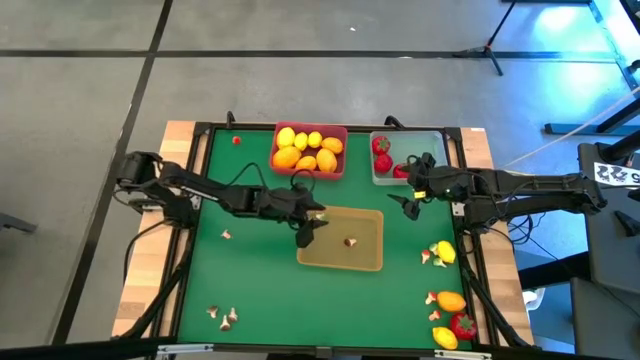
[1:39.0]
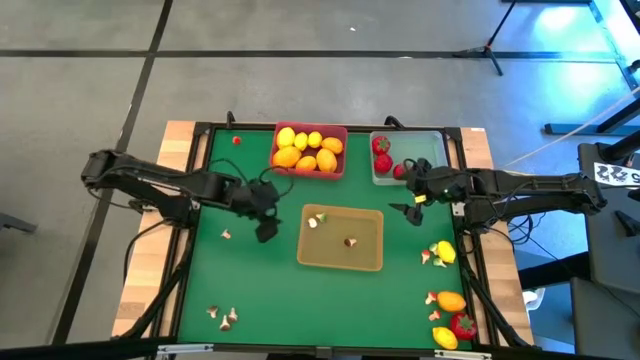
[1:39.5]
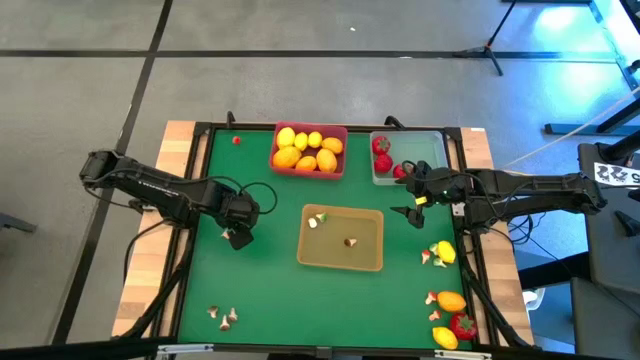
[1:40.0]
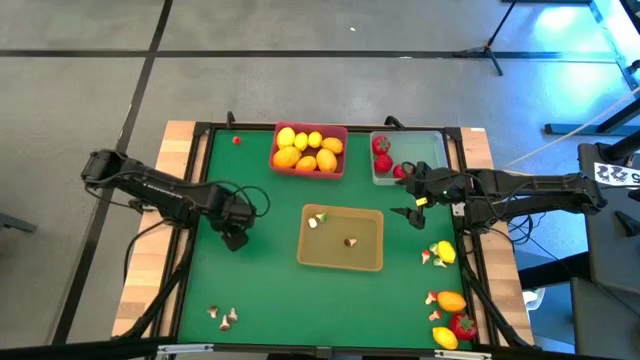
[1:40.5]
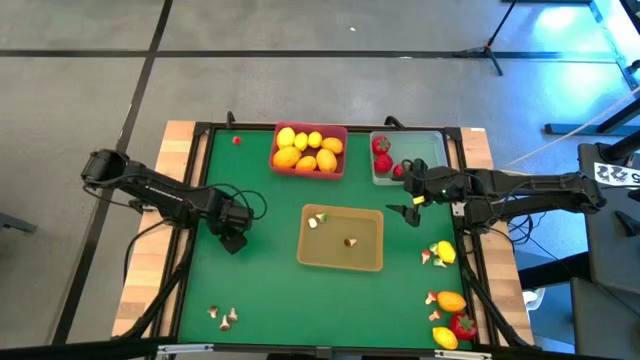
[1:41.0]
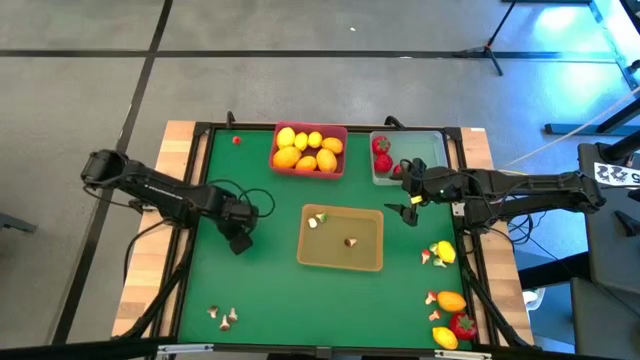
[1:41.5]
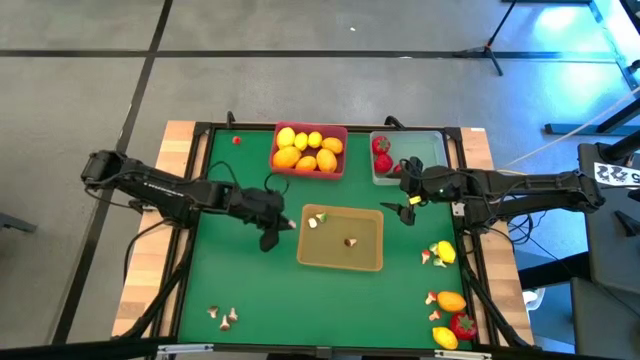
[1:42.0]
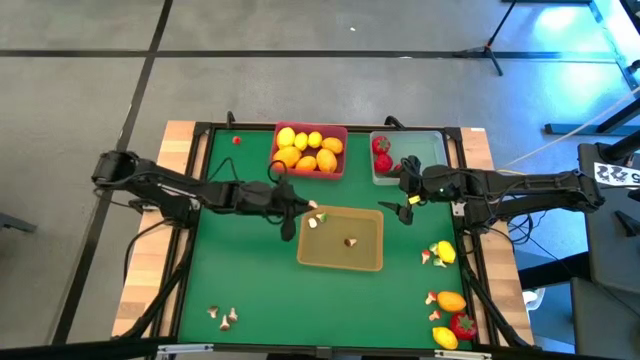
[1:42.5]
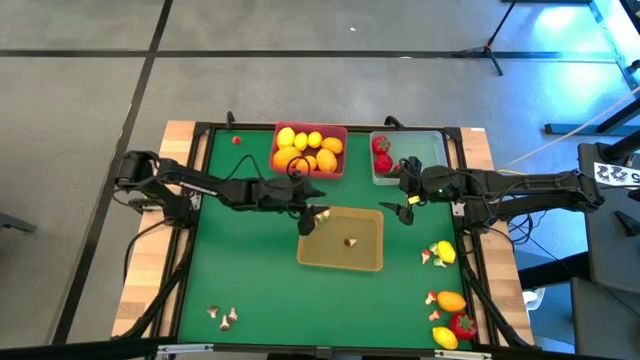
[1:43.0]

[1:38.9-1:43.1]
Task: Sort produce into baskets
Put the light brown mushroom into the orange bin

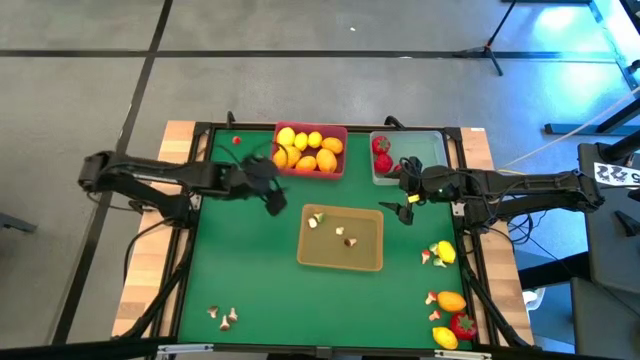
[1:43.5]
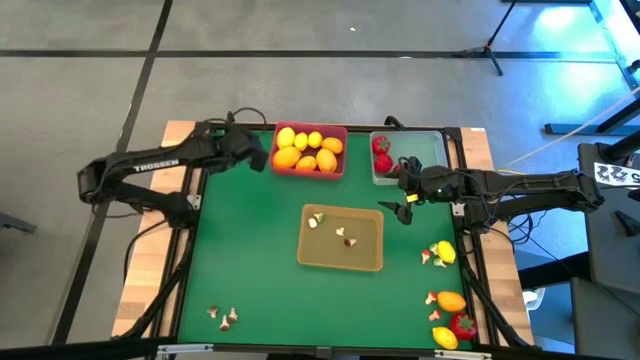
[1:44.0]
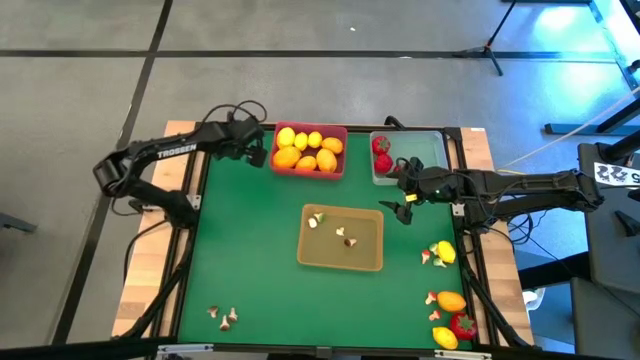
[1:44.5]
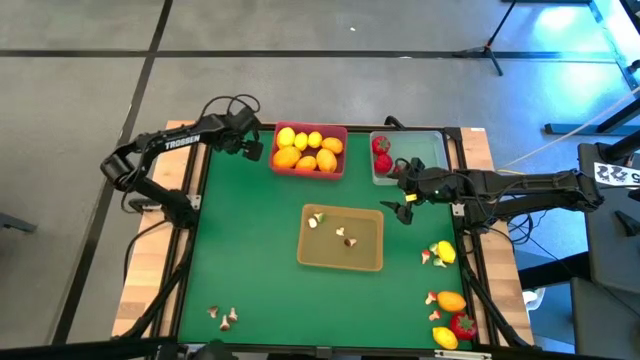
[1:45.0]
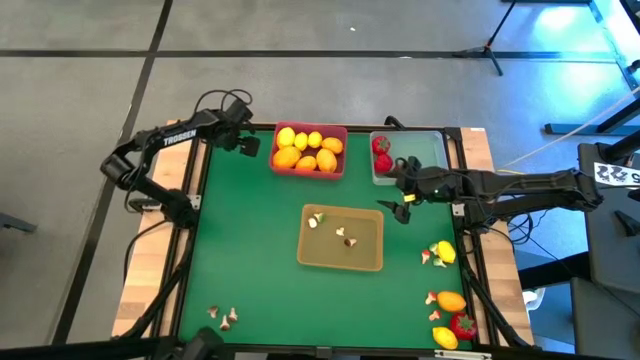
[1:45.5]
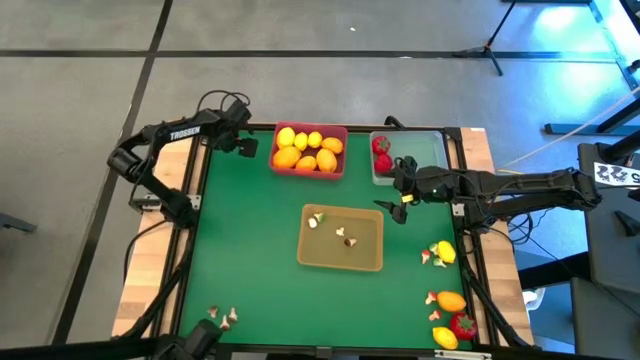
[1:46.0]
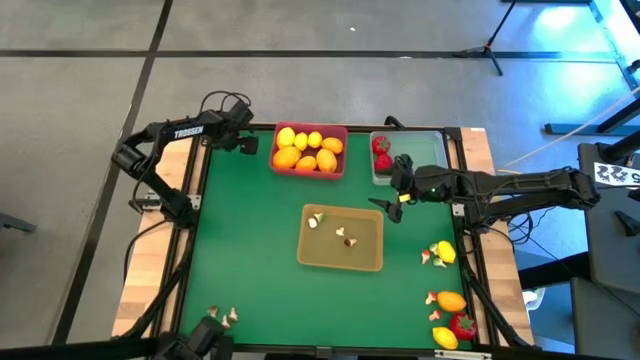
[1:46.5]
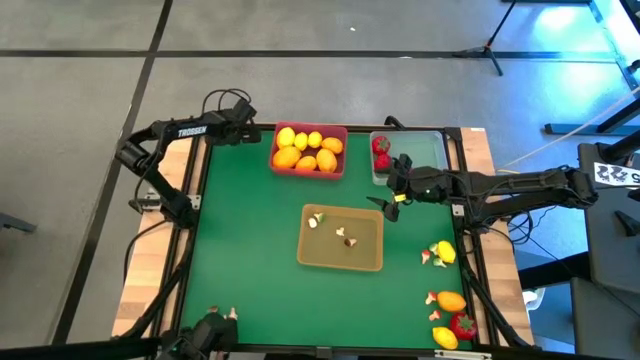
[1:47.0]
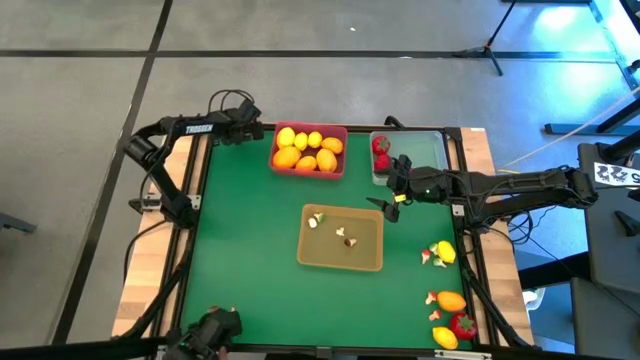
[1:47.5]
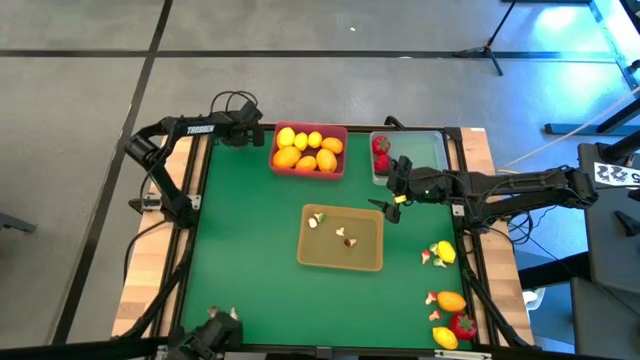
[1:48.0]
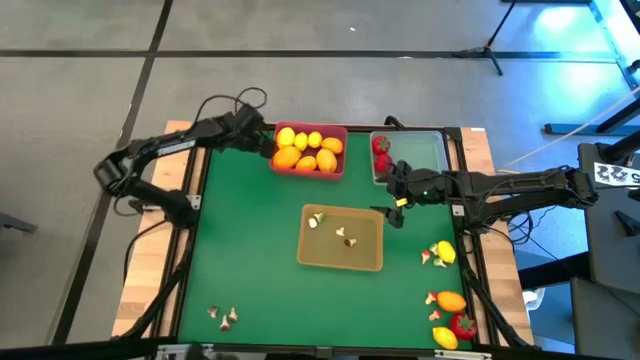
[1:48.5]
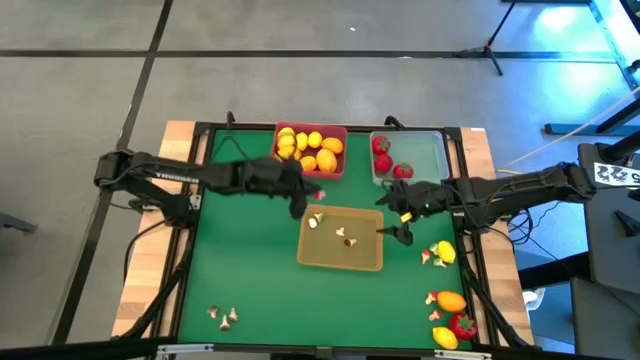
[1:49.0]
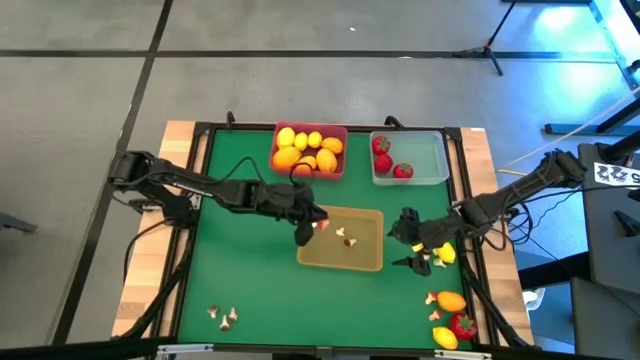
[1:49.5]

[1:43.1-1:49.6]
Put the red mushroom into the orange bin

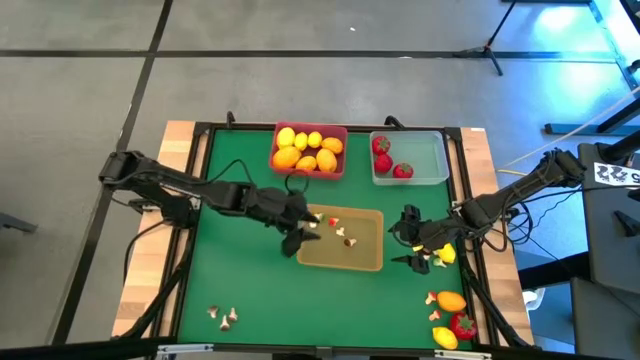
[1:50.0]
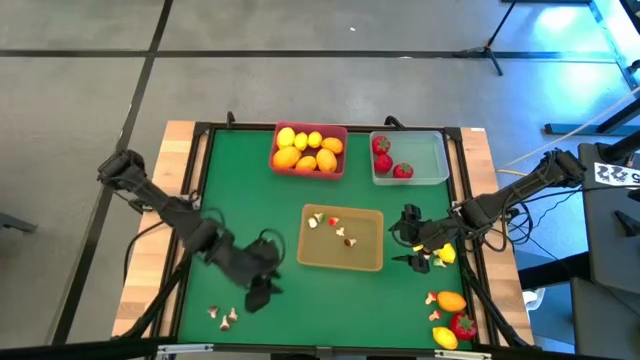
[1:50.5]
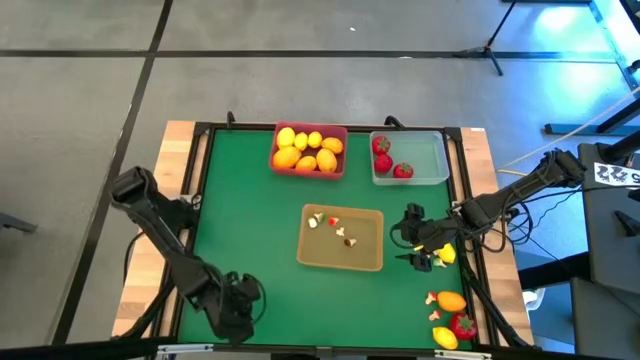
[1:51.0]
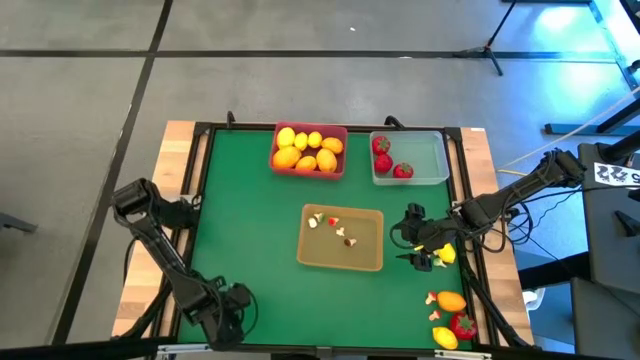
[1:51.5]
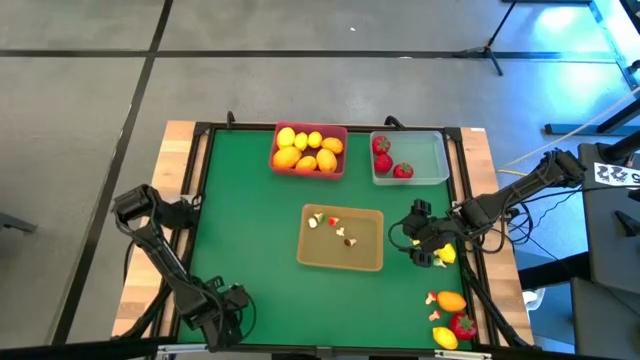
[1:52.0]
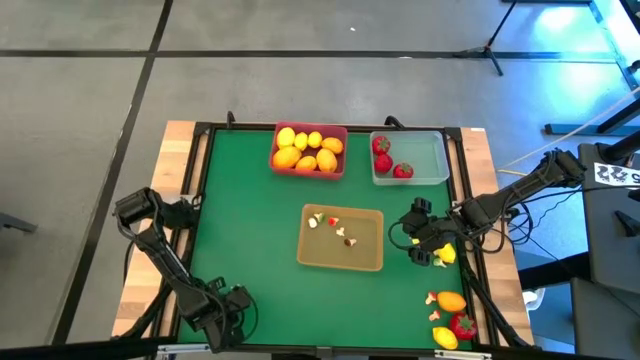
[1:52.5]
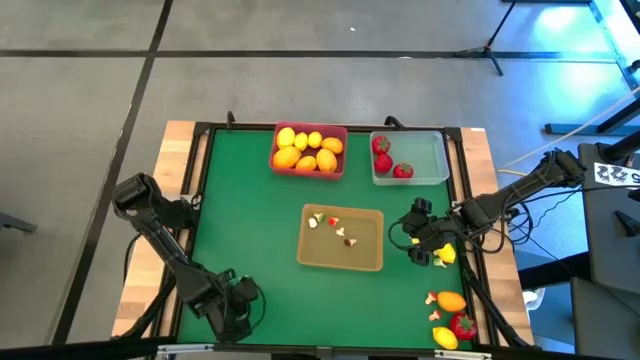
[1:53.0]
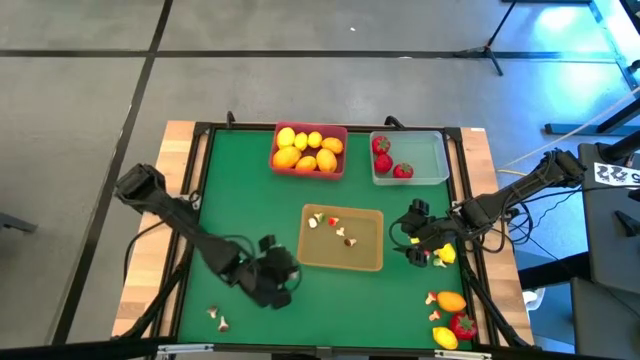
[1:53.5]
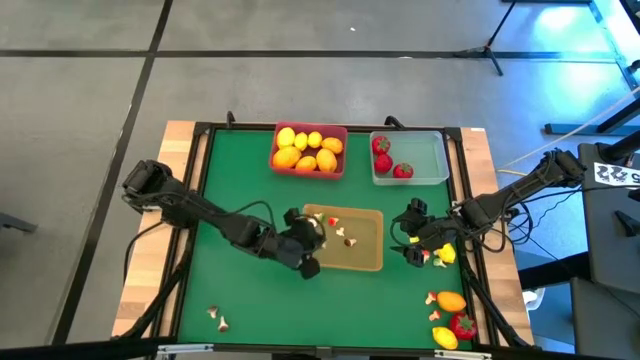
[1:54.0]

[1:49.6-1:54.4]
Put the brown mushroom into the orange bin

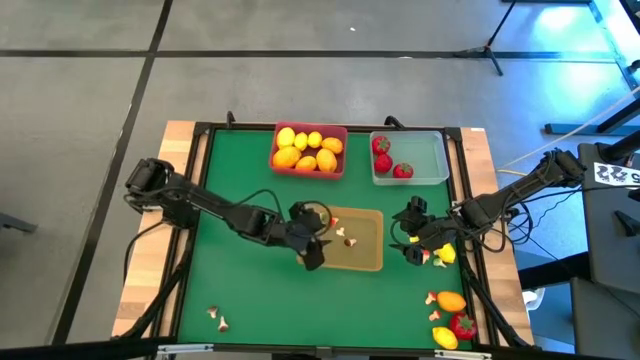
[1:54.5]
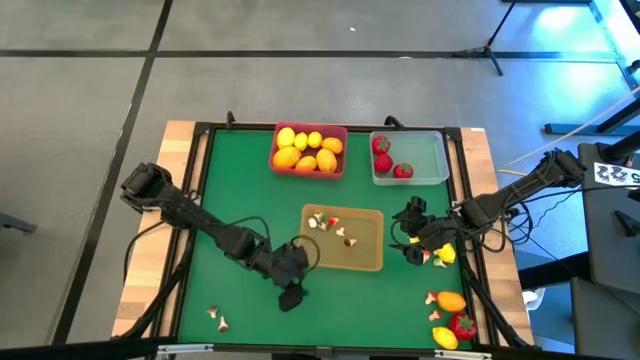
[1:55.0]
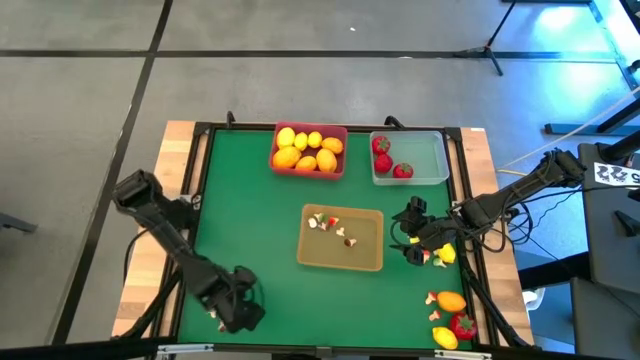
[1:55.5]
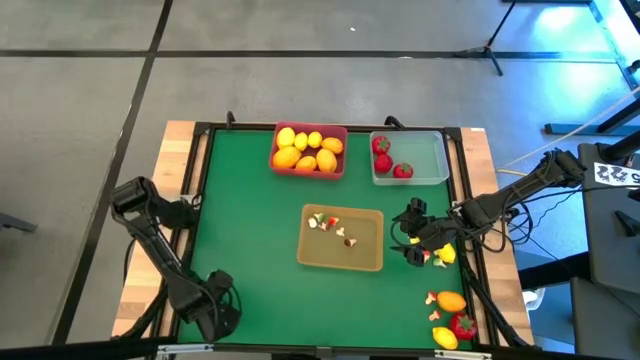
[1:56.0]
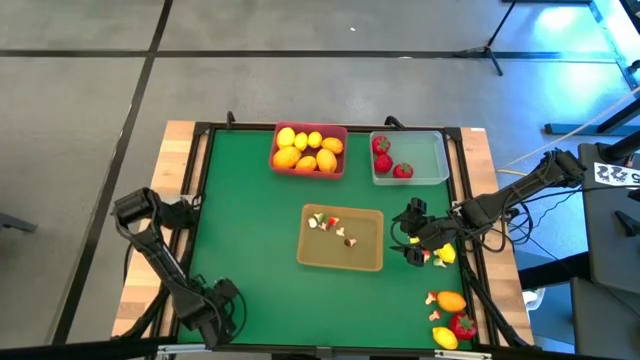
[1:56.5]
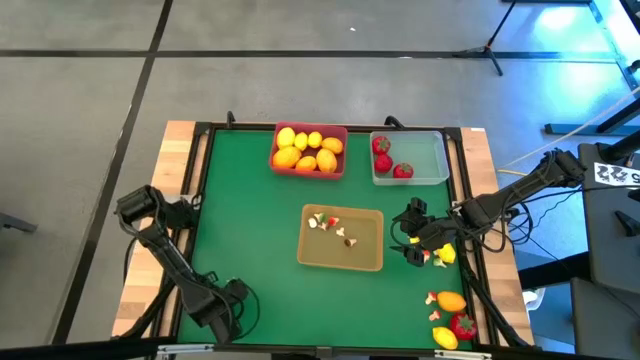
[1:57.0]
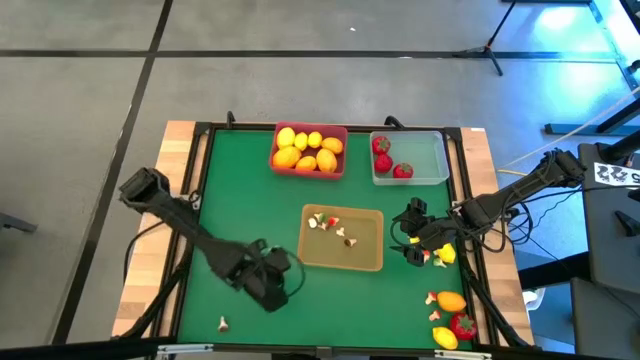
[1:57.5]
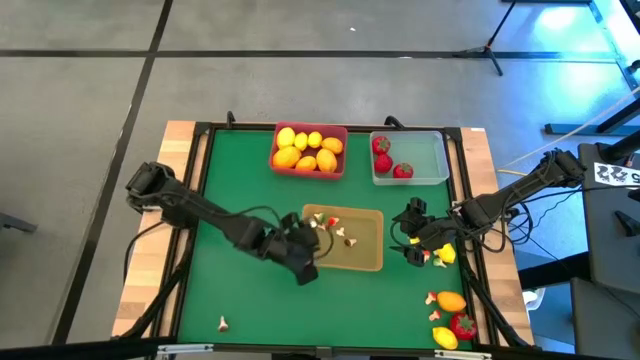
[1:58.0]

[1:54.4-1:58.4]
Put the brown mushroom into the orange bin

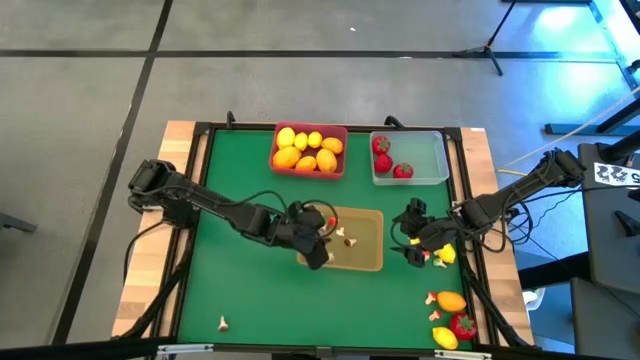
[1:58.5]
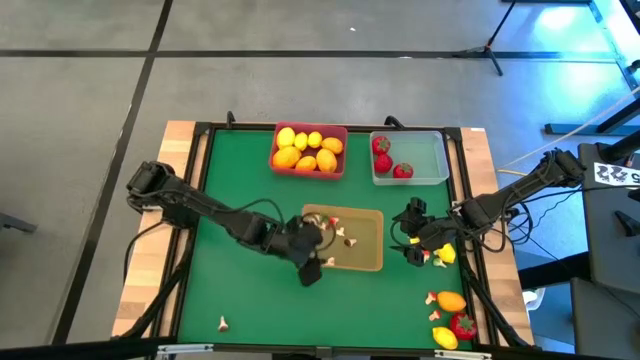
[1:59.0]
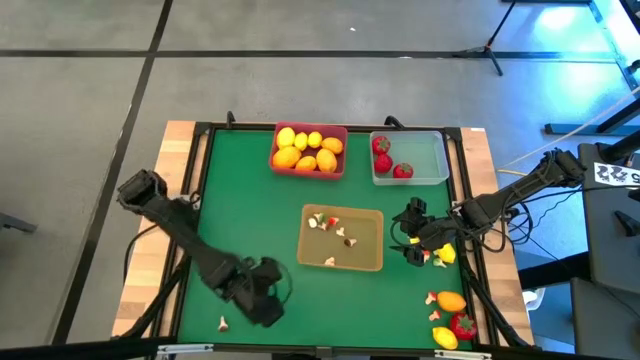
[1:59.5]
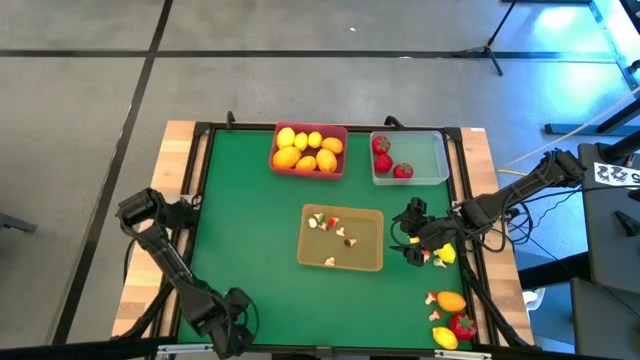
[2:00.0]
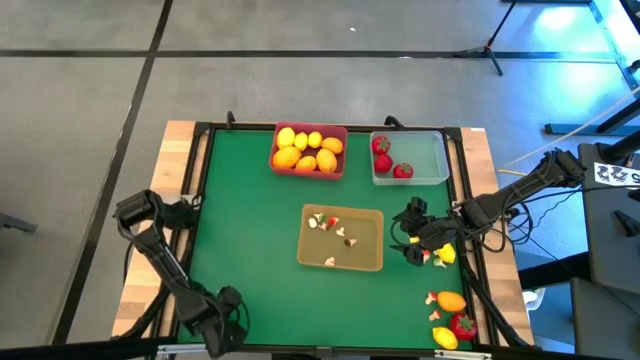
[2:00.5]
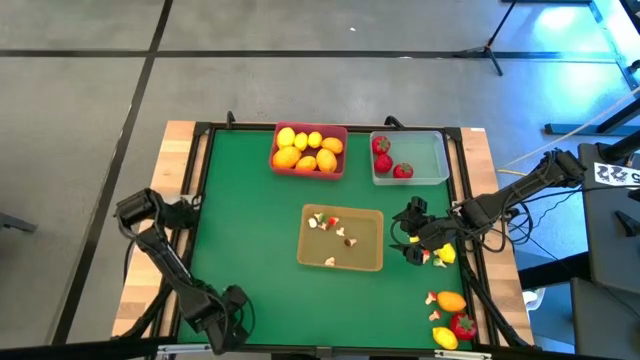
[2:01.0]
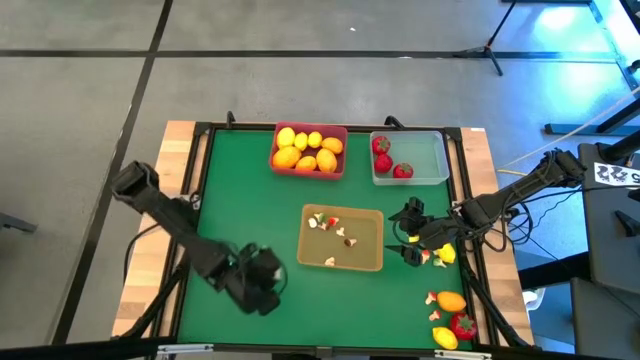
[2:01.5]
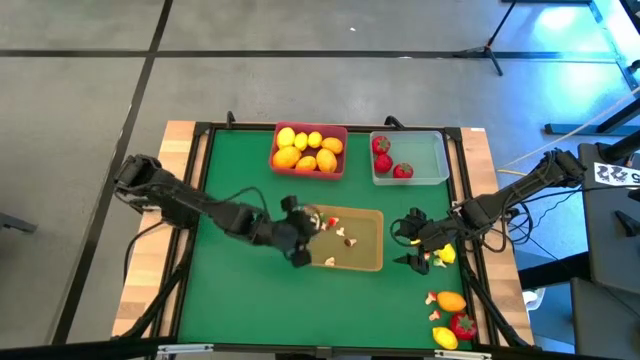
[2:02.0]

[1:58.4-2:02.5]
Put the brown mushroom into the orange bin
